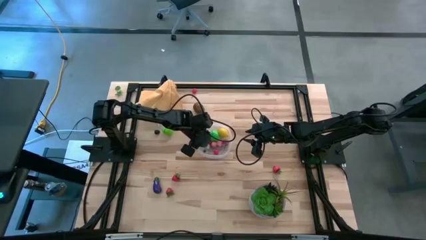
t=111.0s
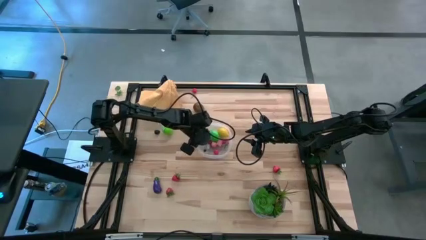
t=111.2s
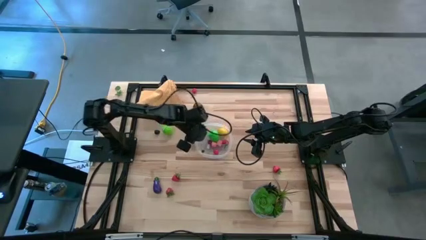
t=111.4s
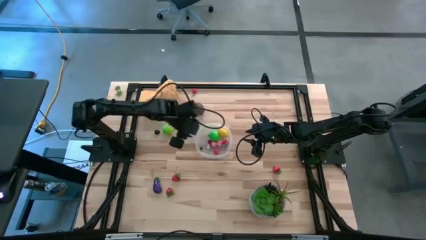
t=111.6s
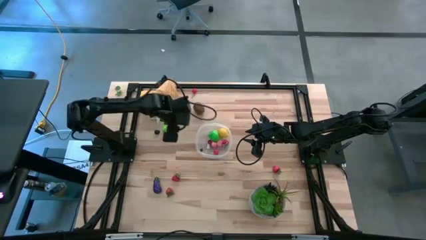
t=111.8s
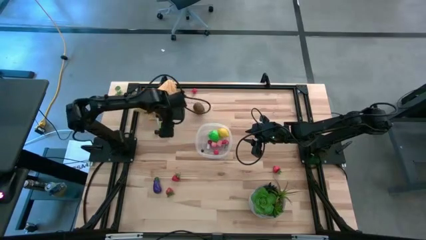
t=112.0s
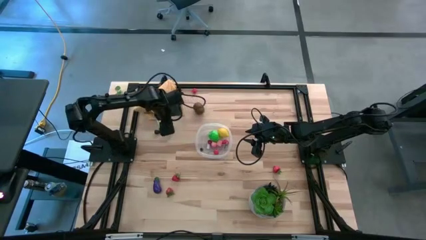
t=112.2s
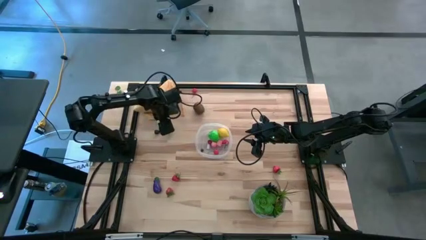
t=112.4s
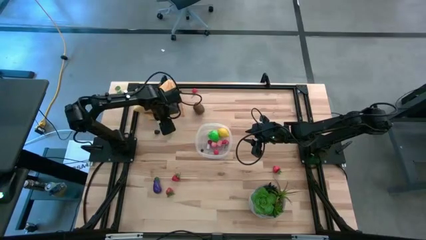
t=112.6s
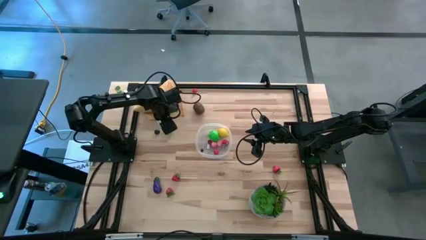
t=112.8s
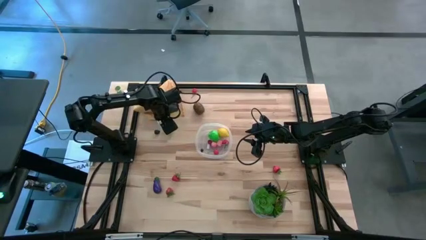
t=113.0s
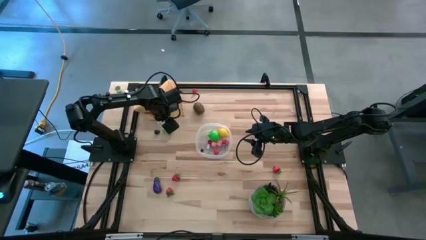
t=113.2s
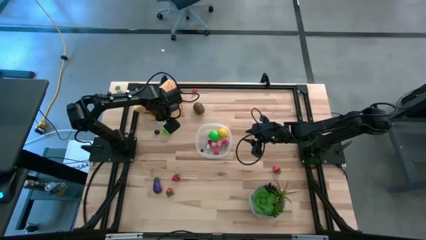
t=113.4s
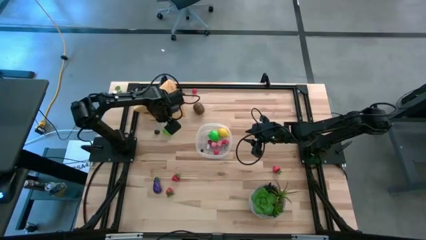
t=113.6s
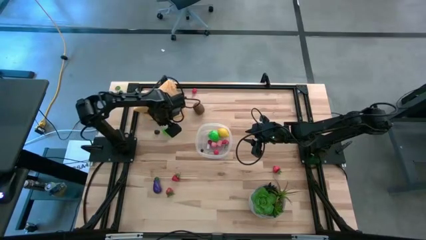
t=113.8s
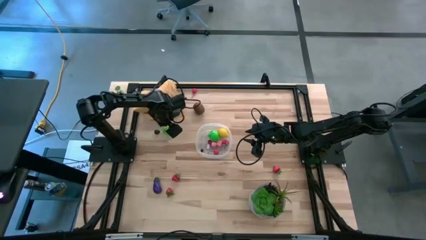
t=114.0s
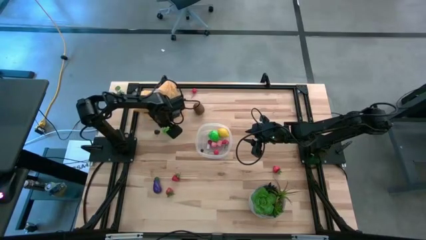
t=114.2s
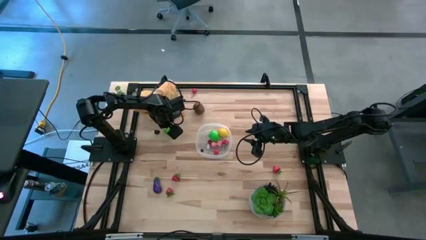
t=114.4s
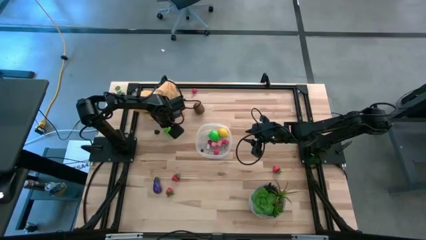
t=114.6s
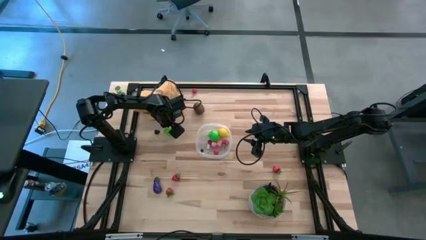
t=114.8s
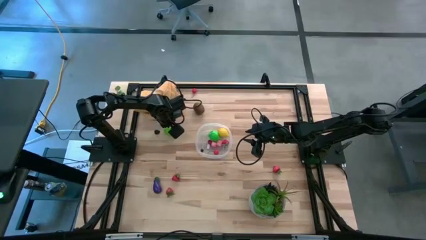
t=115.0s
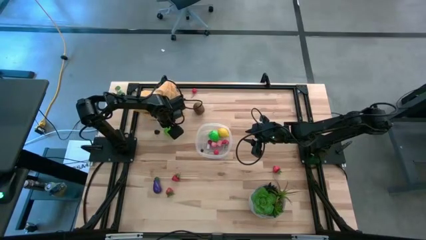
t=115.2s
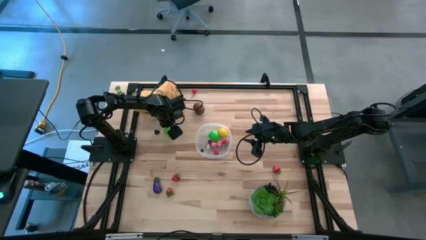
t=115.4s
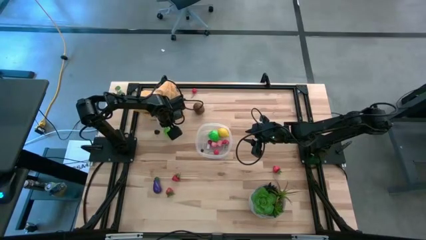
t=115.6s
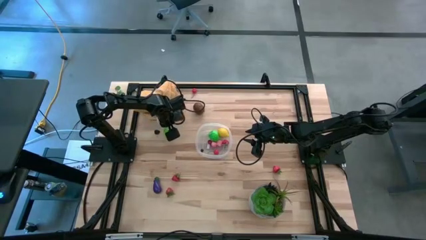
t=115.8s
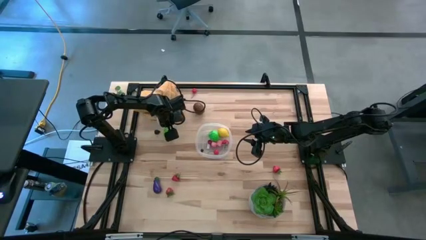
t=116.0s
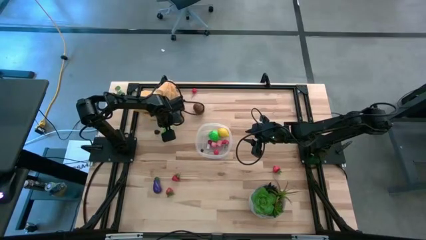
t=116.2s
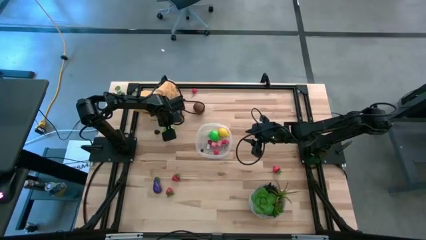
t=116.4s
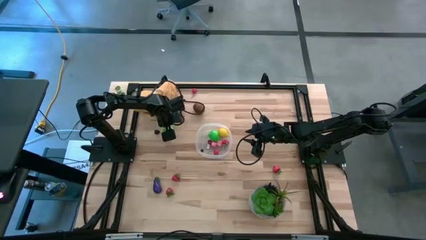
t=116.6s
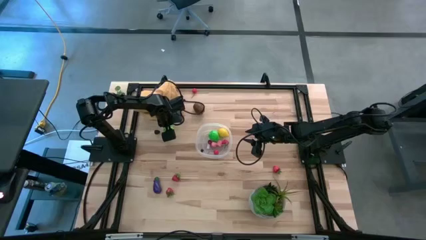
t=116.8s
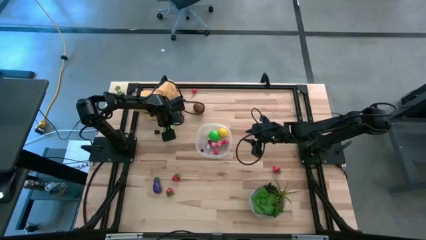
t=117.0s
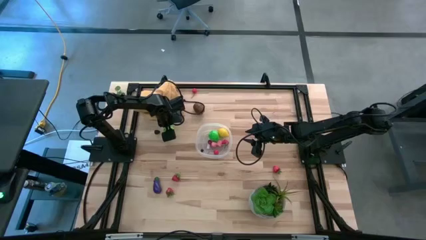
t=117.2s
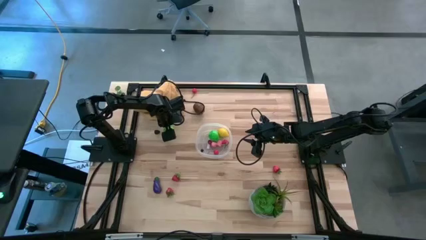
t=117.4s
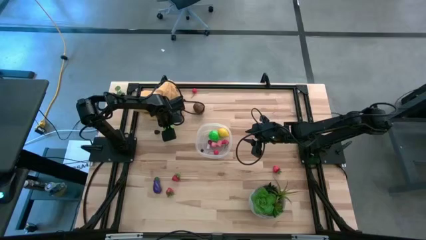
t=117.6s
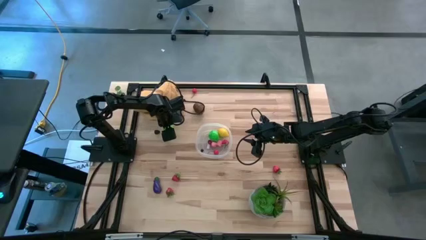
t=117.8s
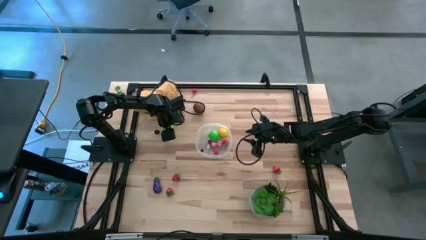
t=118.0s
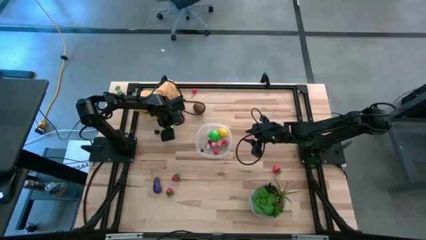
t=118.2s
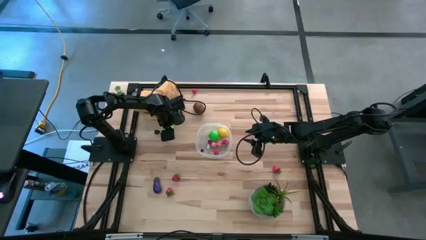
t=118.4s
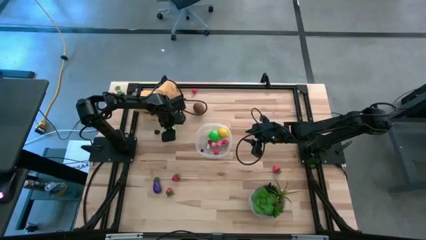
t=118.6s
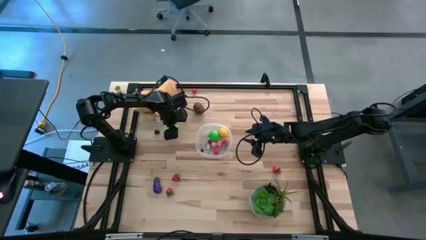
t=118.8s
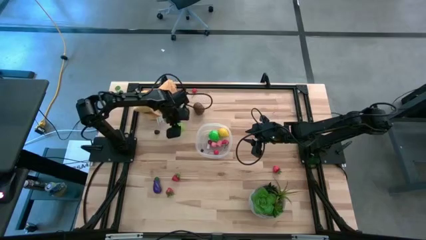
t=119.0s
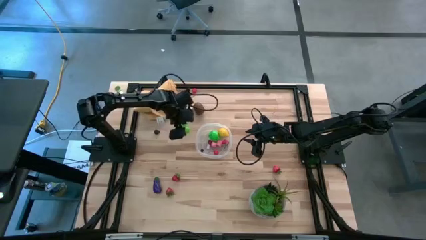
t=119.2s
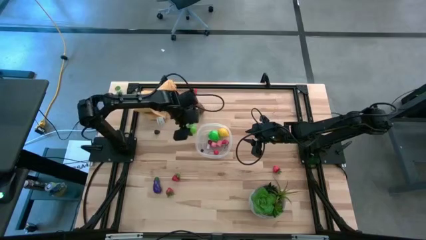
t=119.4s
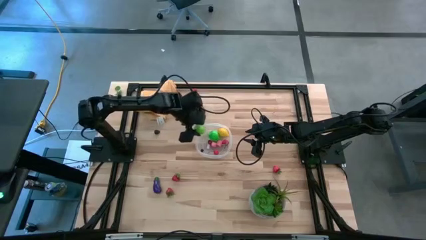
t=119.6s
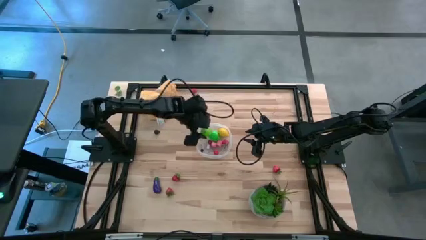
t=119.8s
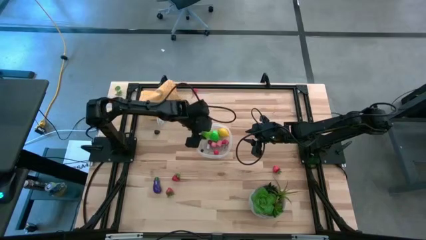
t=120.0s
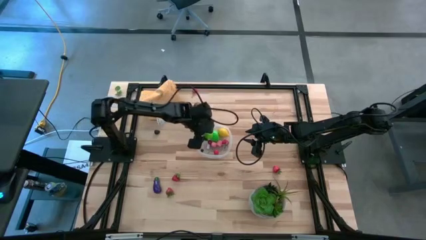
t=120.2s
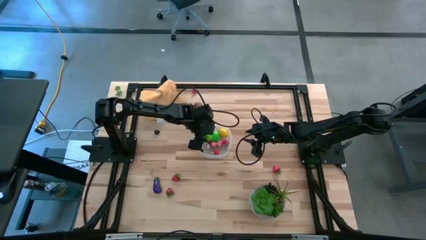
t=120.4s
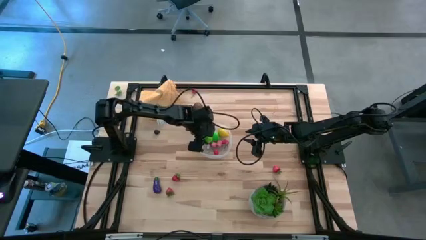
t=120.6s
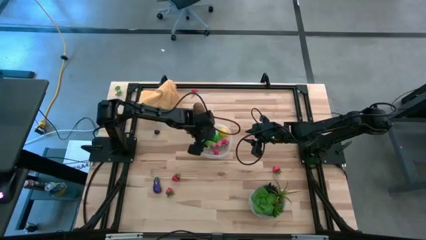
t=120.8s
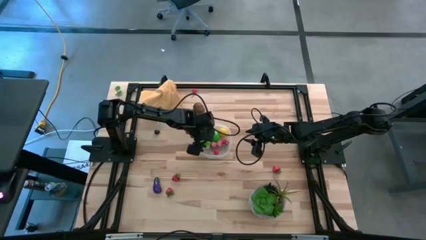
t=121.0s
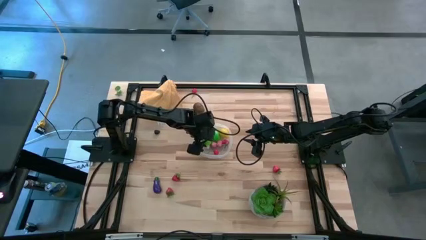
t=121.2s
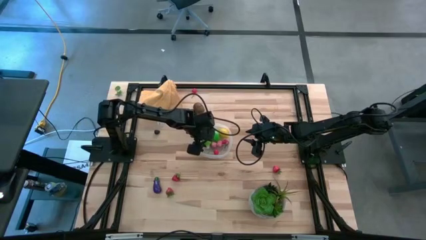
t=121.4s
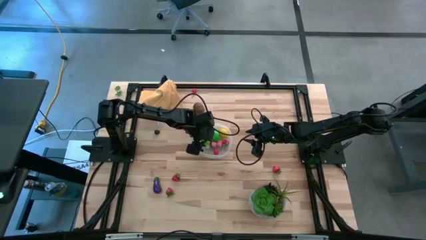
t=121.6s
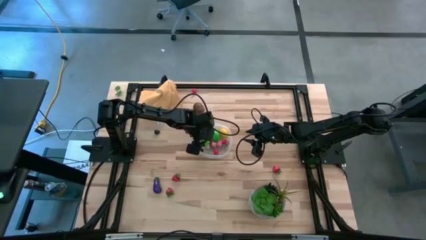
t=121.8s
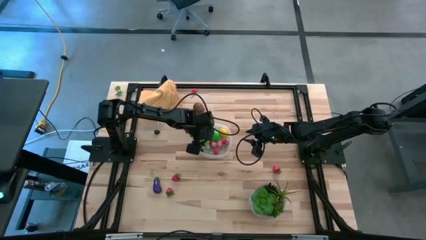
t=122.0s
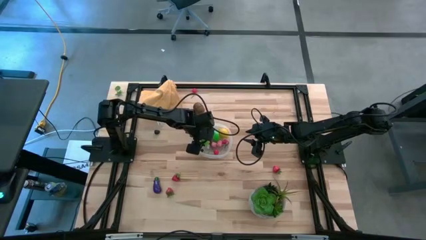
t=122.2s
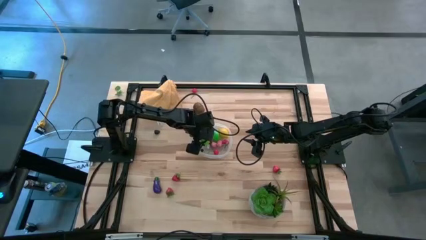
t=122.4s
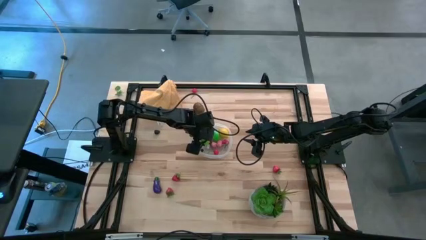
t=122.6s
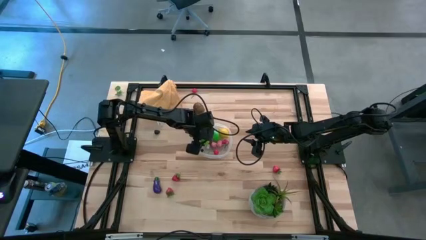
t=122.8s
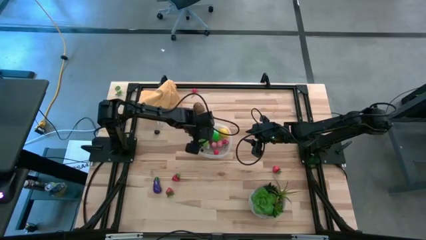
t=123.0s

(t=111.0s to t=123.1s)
Task: Pick and placing Produce into tupperware
Put the cabbage into the transparent bin

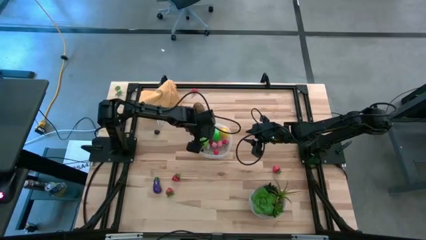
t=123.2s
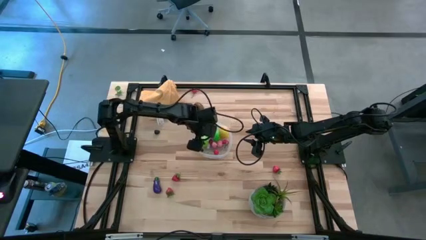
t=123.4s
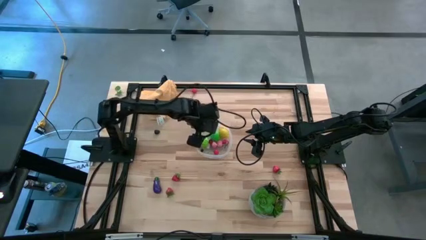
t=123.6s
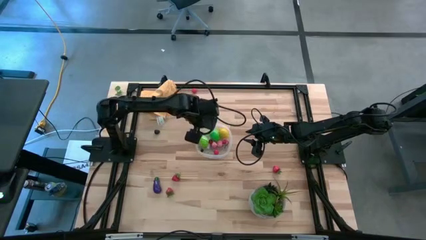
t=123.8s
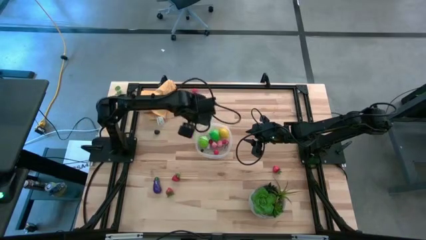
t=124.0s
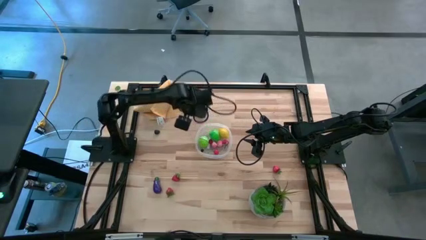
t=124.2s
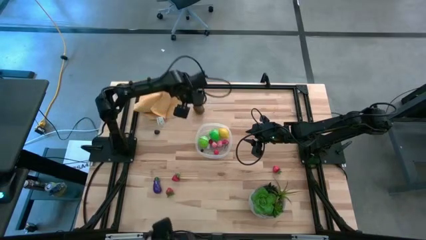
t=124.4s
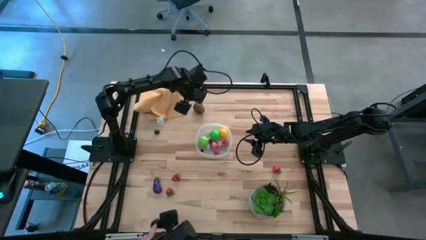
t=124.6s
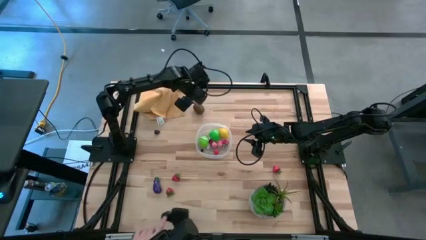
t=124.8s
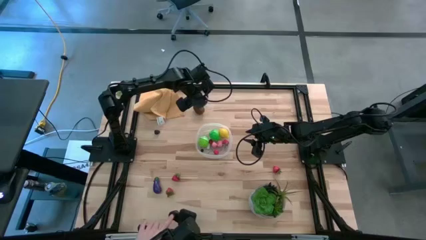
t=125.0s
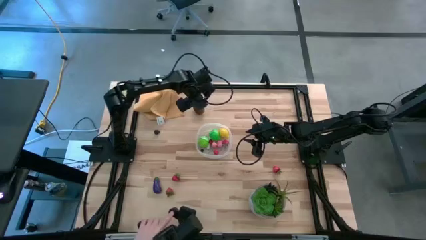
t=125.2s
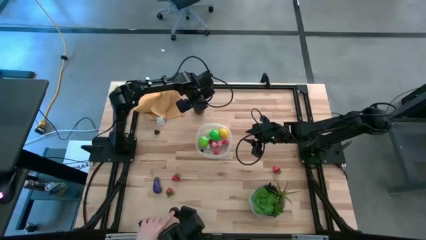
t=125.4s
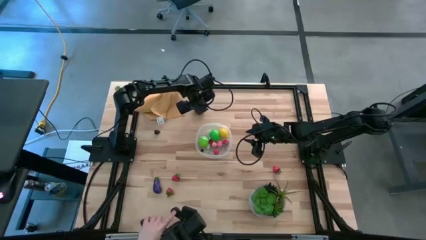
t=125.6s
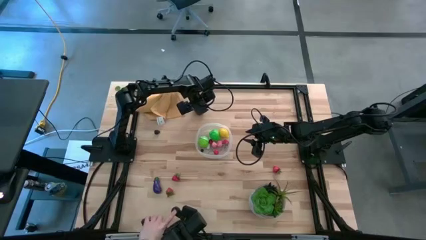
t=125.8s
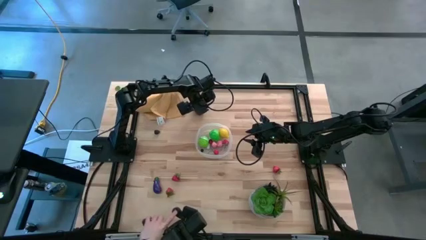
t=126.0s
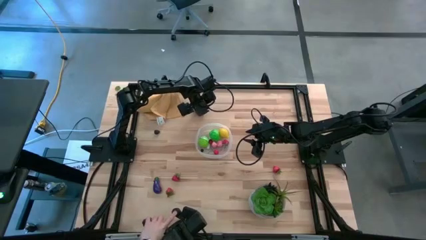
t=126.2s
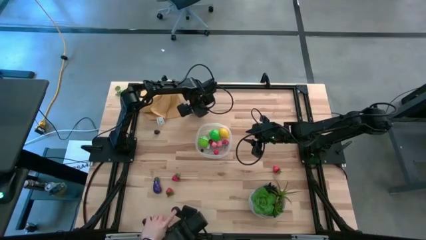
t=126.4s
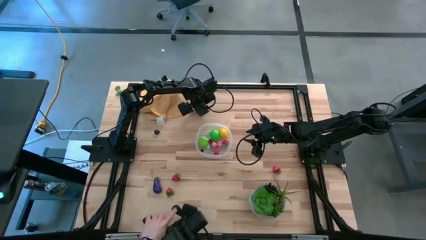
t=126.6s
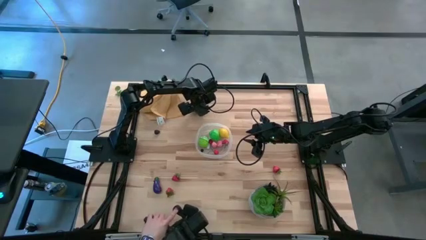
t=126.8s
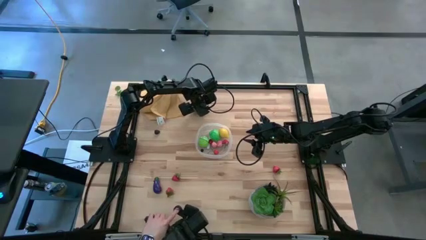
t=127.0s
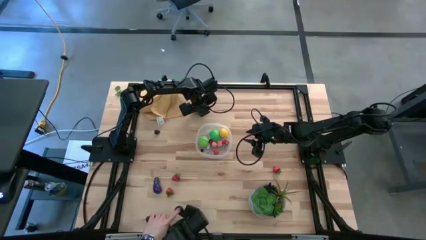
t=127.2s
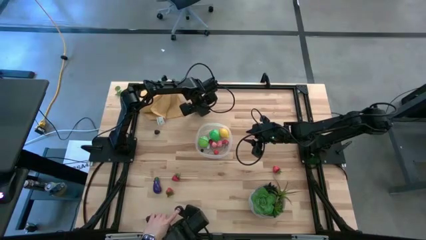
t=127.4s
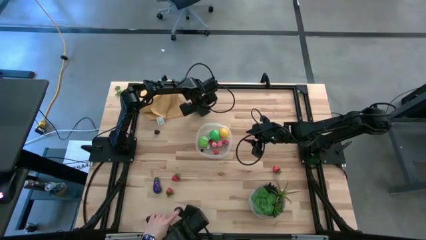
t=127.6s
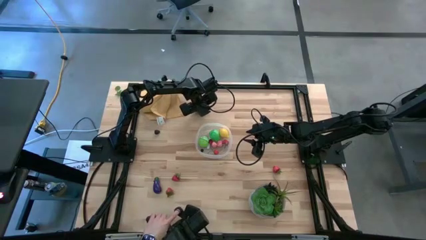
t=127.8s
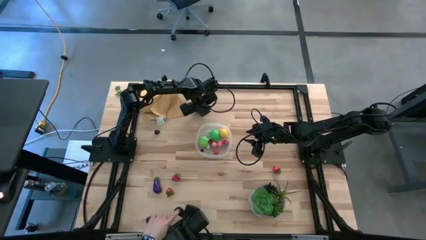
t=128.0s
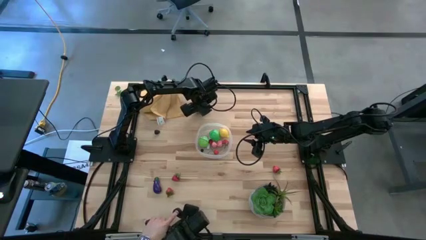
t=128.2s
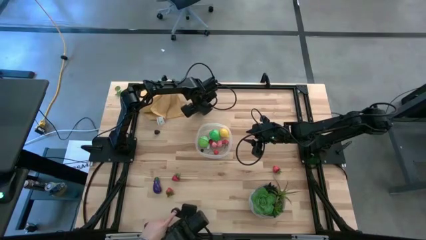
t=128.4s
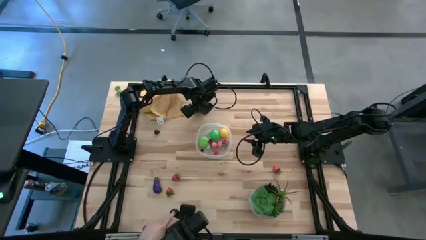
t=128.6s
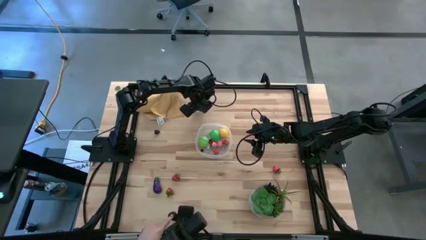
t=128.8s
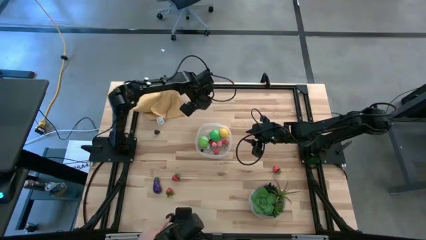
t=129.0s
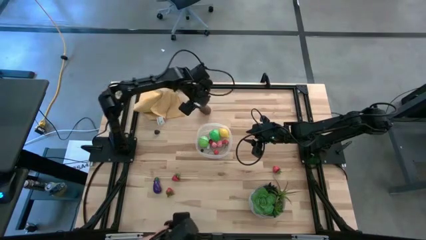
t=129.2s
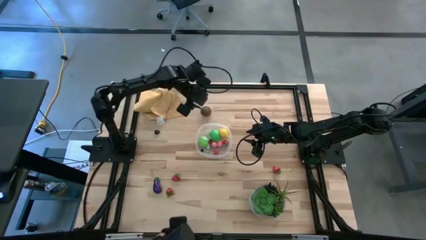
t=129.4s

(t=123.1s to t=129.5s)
Put the kiwi into the transparent bin
